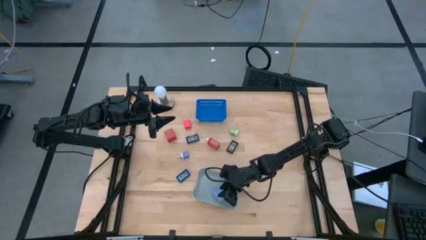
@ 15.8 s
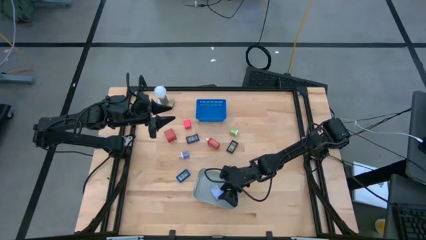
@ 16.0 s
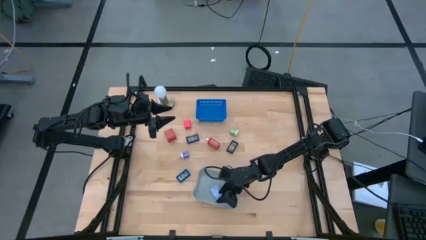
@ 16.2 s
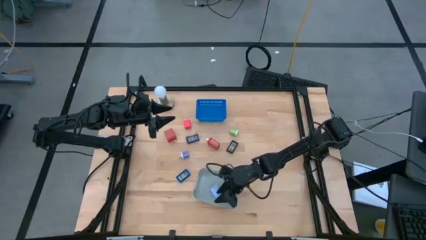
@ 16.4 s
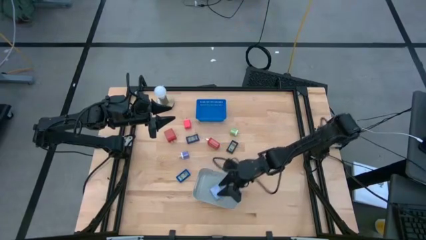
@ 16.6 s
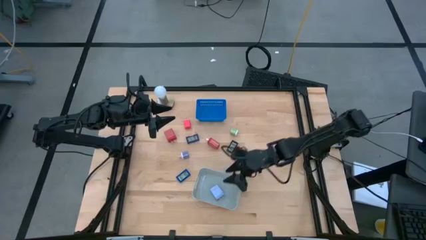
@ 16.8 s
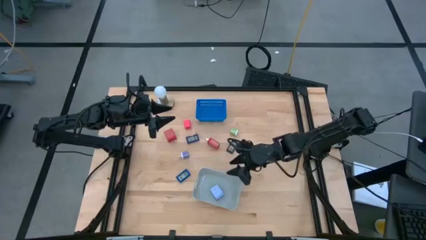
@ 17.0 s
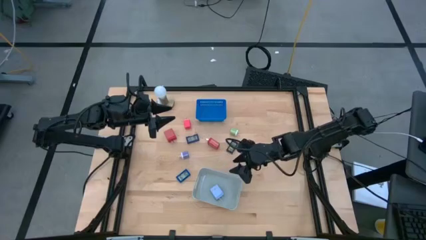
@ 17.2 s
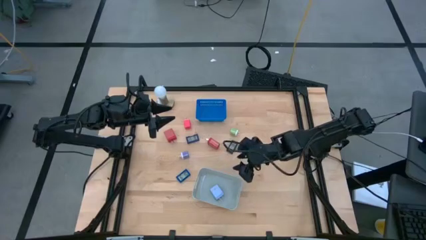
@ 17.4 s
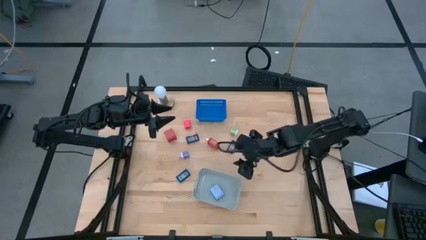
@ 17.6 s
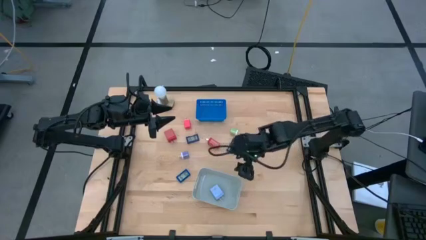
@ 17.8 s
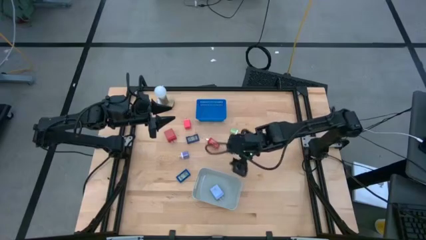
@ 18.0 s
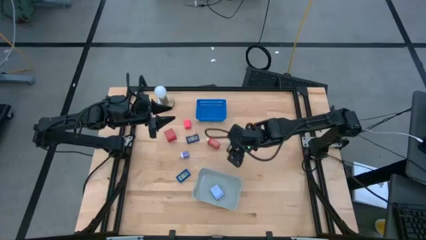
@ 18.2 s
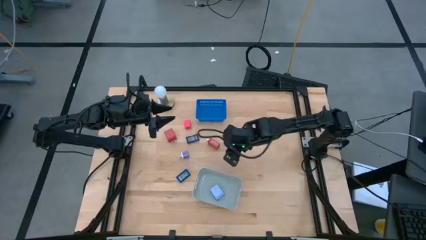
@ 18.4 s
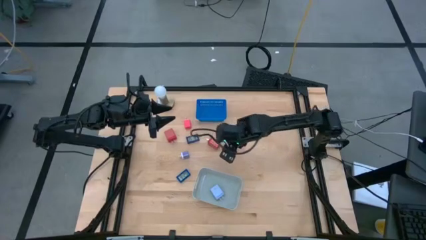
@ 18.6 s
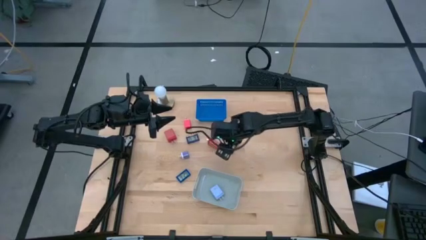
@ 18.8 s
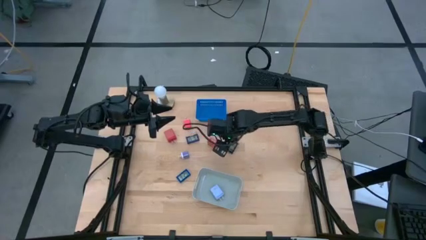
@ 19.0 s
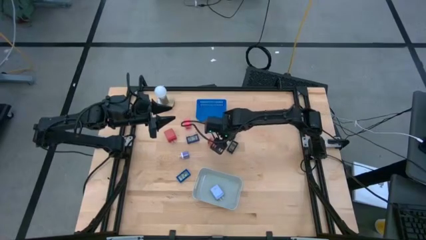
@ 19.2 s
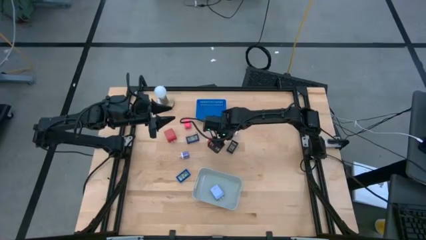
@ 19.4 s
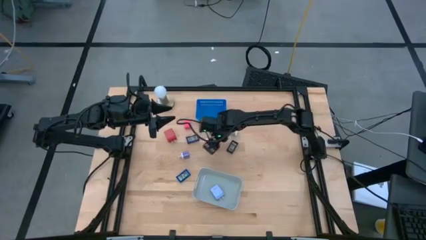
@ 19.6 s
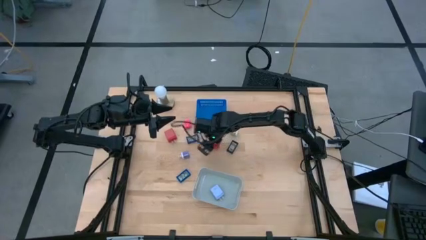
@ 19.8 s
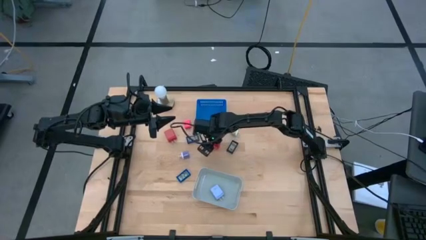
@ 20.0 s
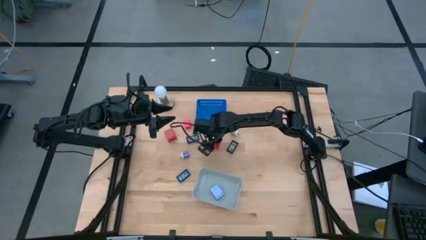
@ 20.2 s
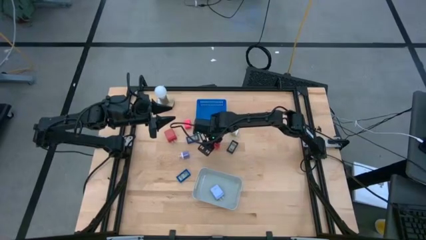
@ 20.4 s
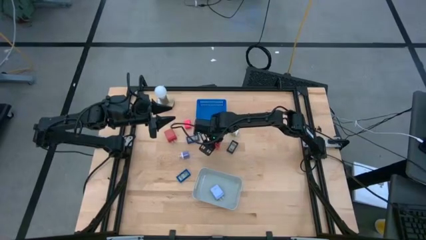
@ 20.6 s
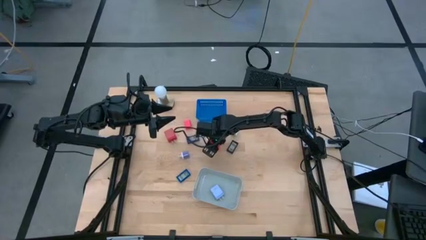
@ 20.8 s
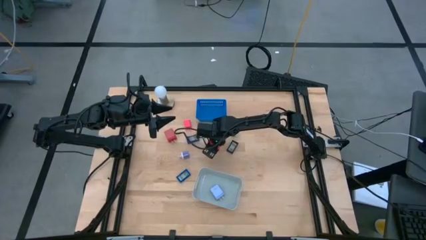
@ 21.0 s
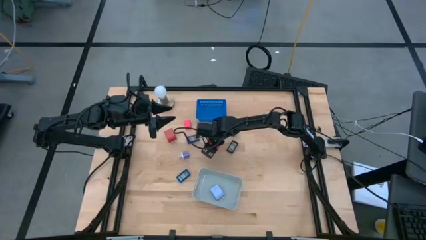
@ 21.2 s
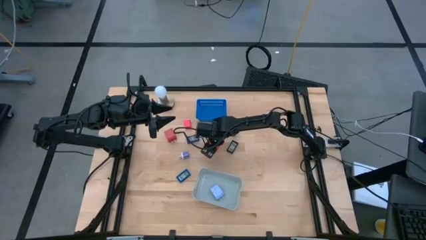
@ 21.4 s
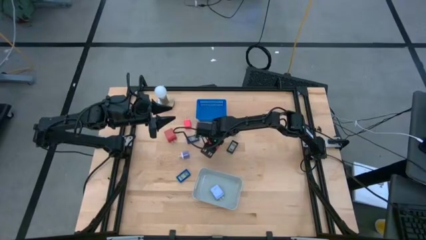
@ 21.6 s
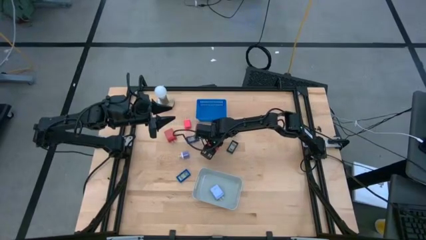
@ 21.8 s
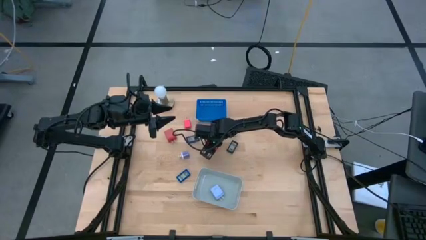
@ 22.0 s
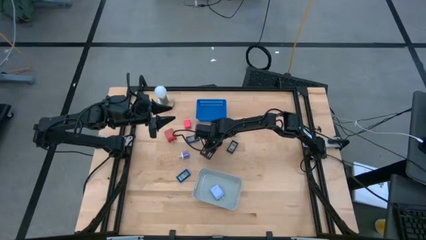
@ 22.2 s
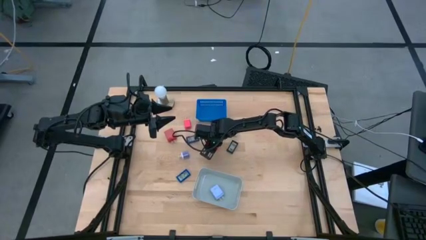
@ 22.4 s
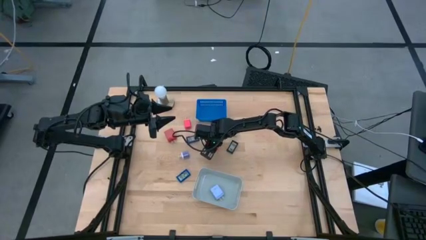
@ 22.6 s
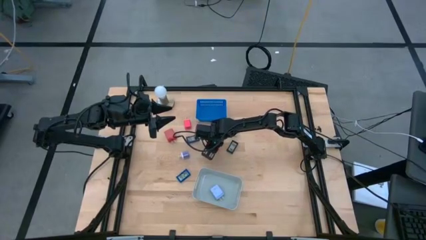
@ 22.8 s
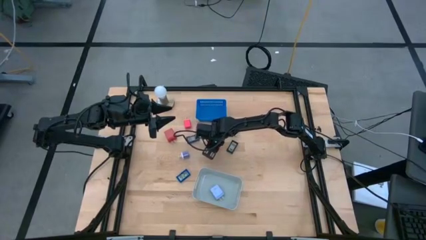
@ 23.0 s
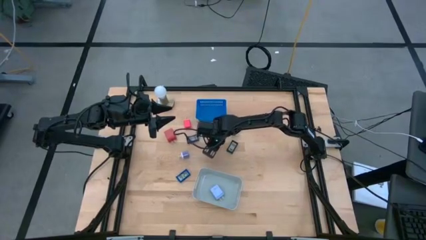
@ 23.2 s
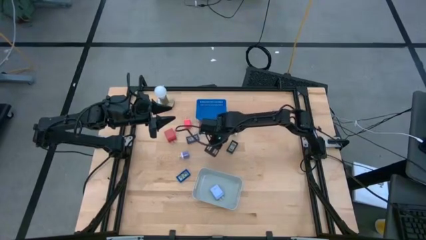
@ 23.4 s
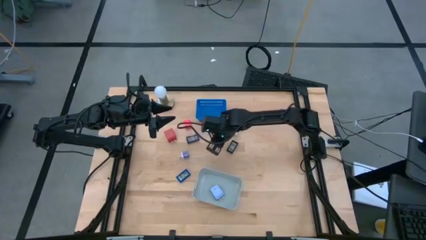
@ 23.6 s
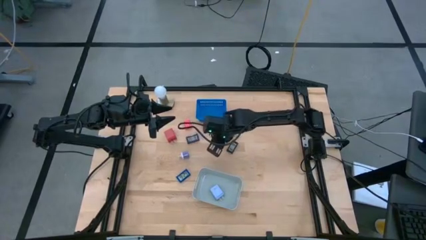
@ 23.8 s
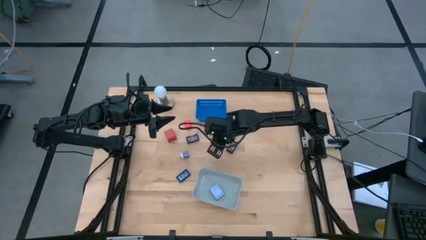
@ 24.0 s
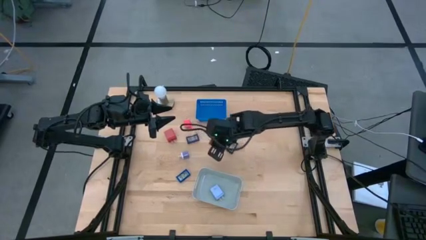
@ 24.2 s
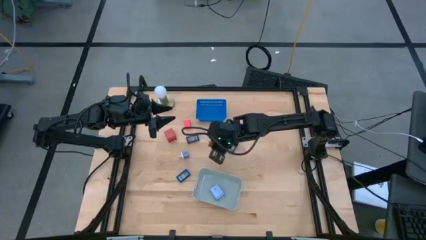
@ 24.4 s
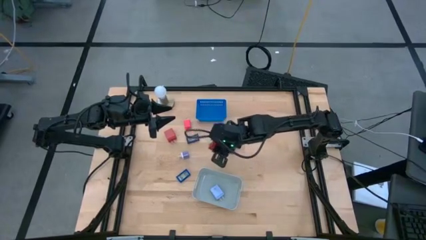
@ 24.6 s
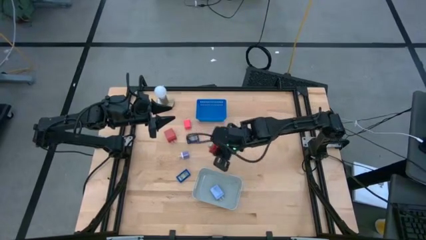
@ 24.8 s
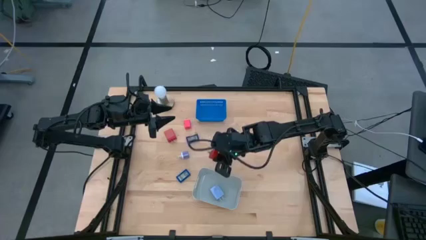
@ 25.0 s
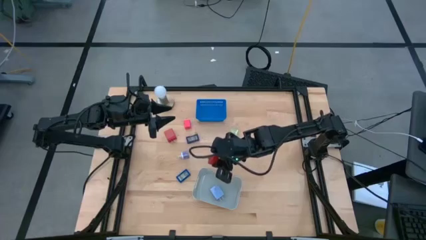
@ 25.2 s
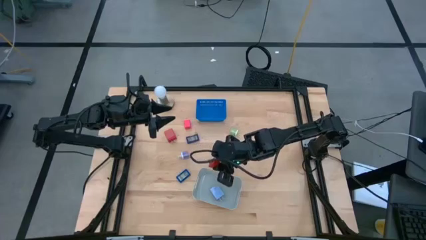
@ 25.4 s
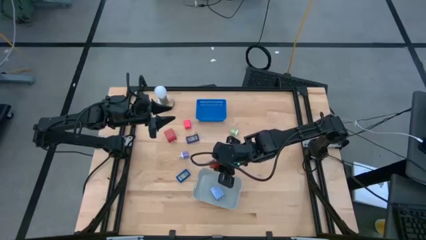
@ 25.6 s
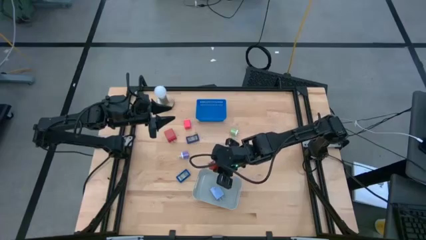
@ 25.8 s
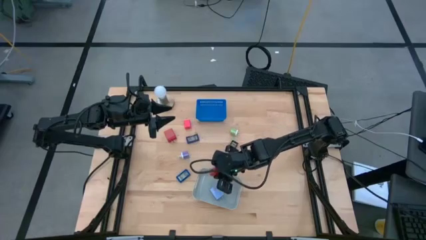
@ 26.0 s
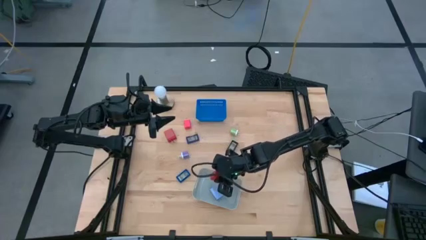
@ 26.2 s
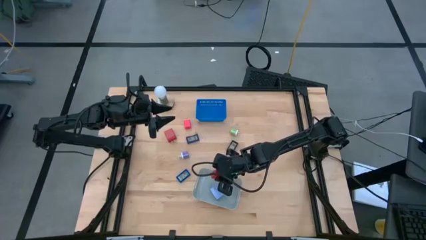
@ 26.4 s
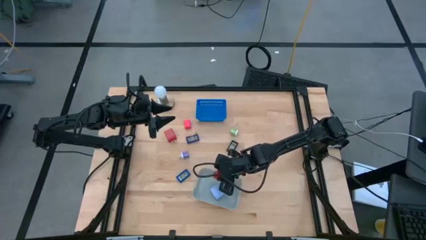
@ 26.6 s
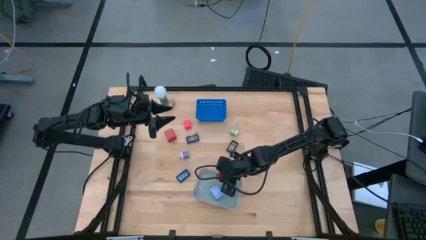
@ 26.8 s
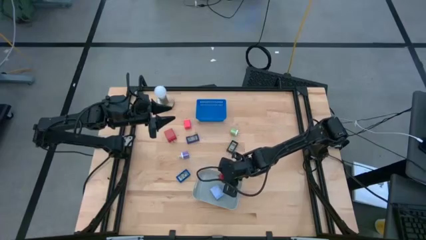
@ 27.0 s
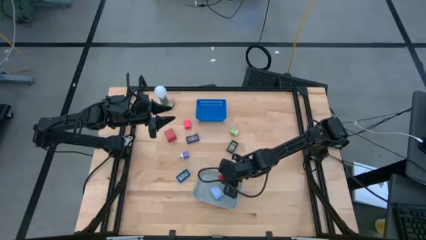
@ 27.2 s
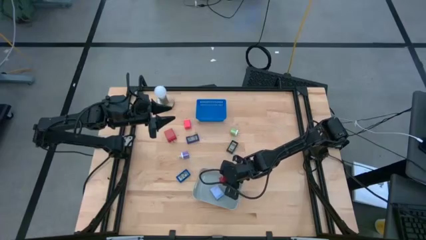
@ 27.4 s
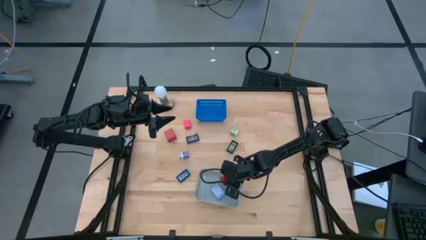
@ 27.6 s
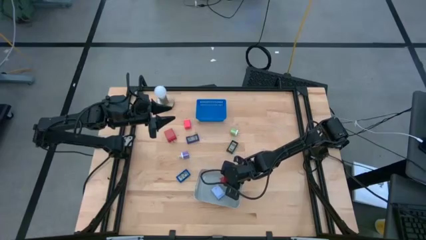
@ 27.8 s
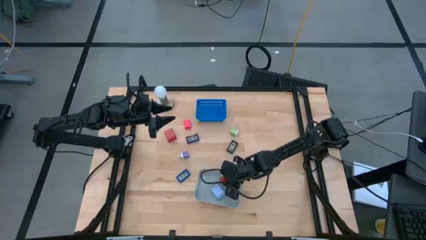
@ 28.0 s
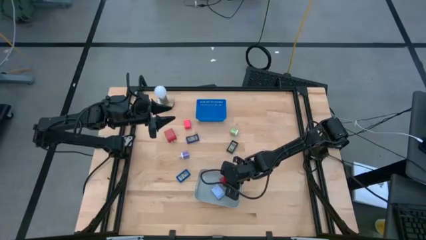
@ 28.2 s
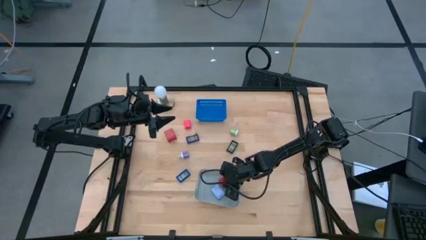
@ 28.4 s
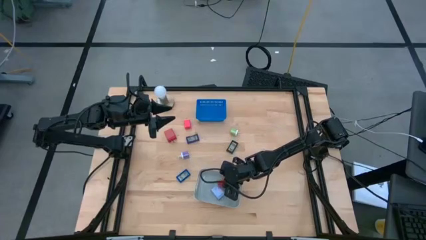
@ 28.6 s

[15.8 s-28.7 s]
Task: Pick & Place Office items
Put the right red charger adapter into the gray bin
